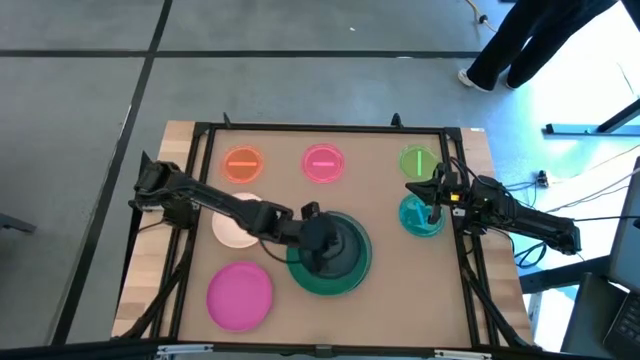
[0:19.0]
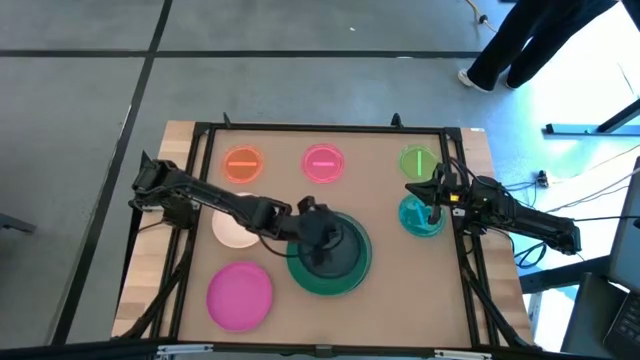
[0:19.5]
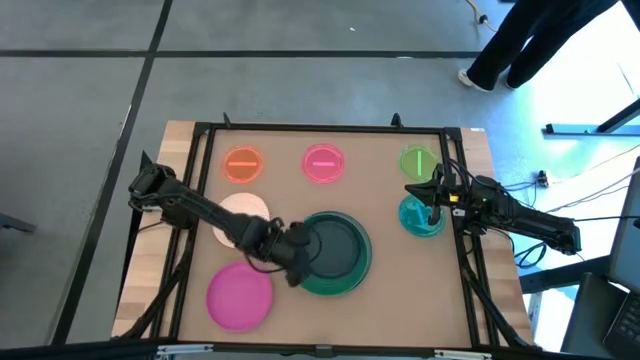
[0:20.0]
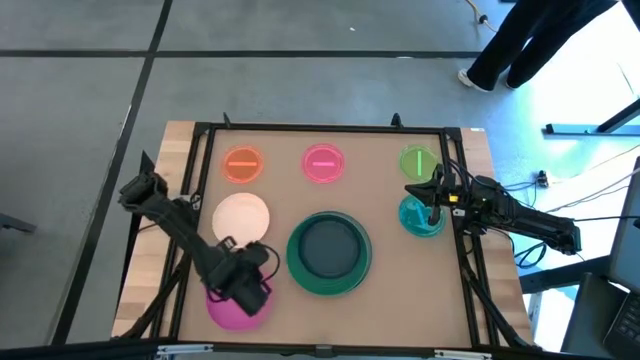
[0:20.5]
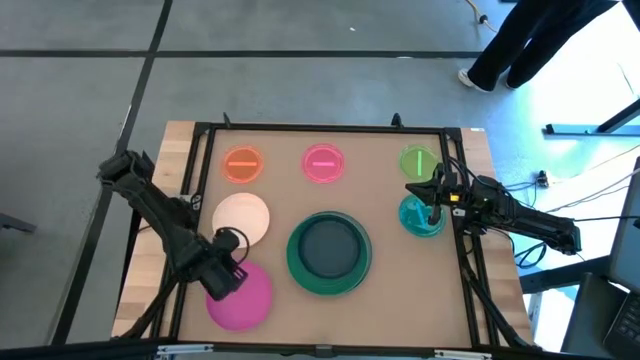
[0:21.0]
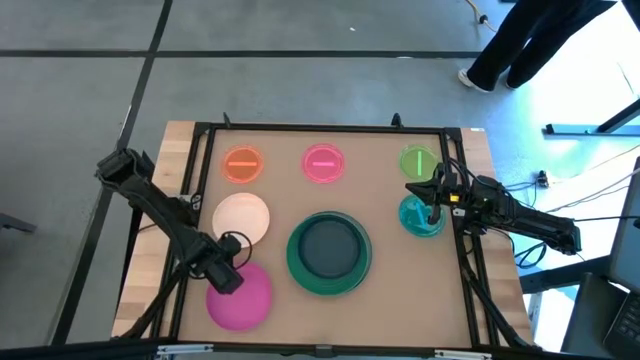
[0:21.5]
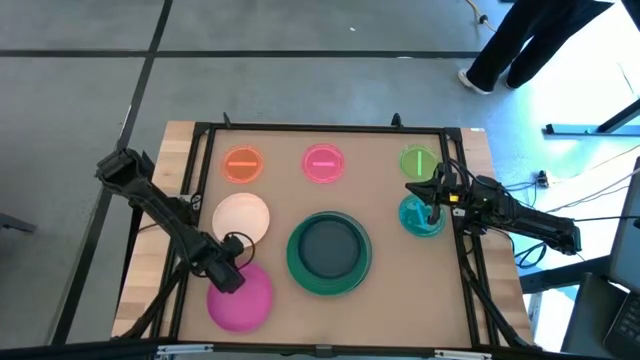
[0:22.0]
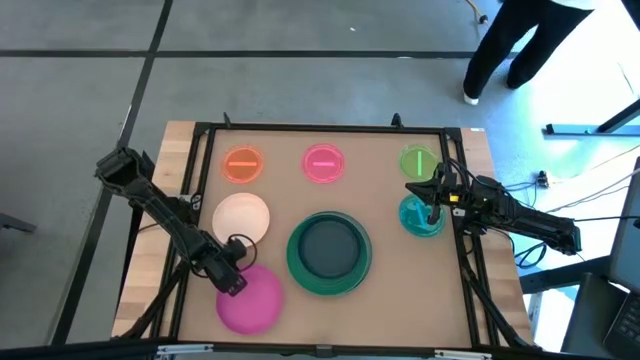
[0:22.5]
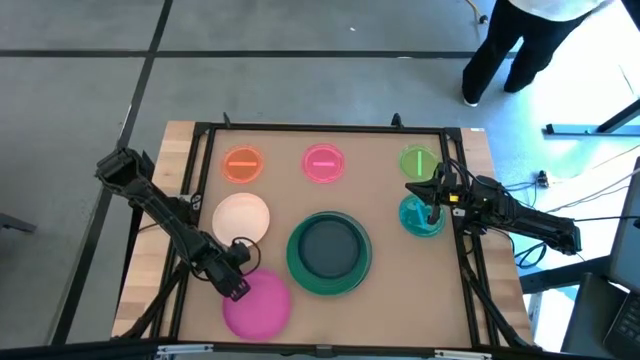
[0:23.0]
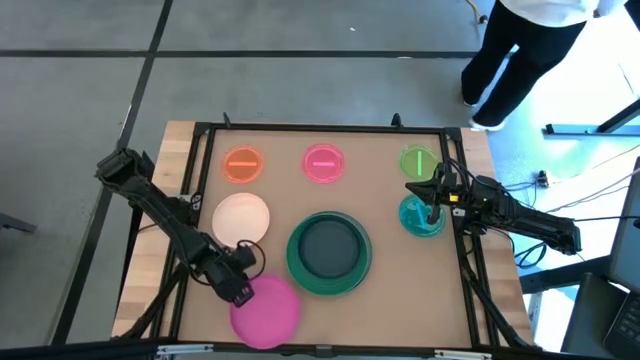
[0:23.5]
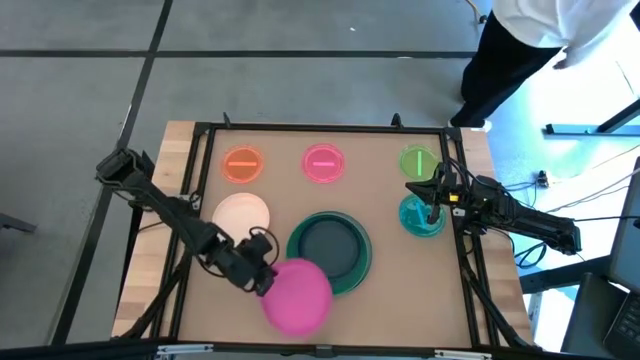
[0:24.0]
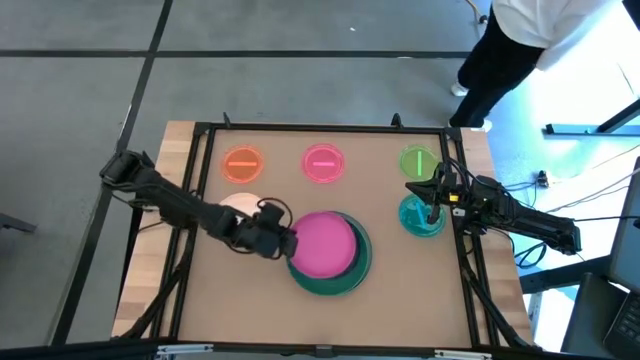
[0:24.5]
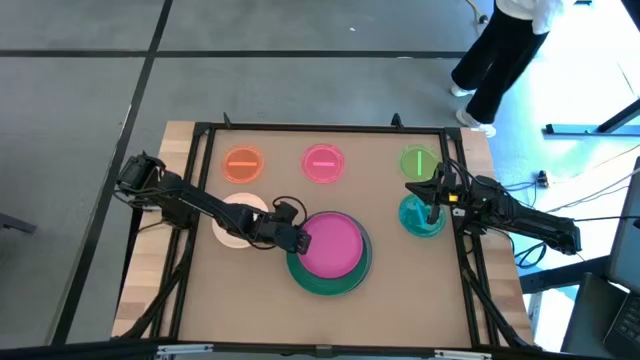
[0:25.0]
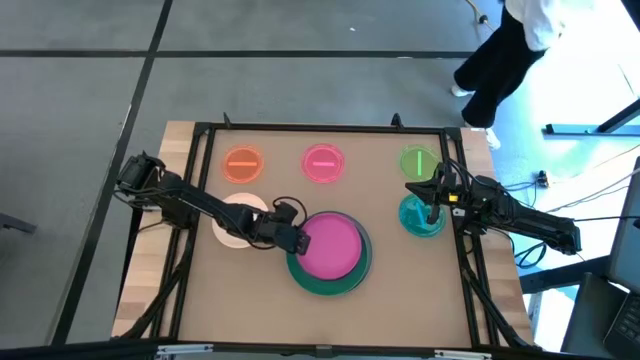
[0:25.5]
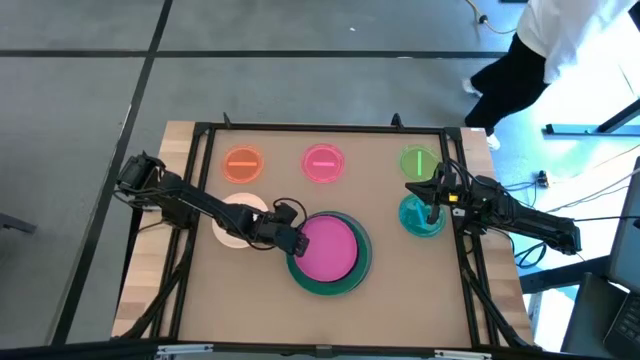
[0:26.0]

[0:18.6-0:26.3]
Task: Stack plastic plates
Stack the dark pink plate on top of the dark blue plate

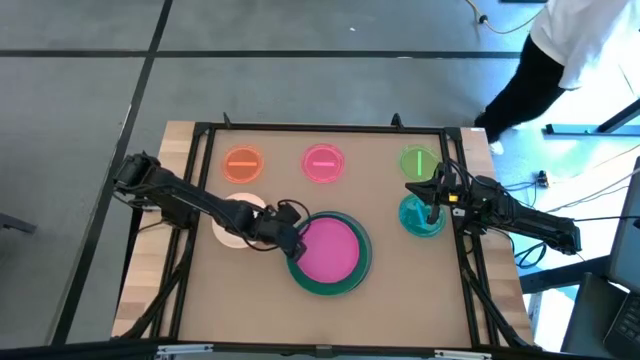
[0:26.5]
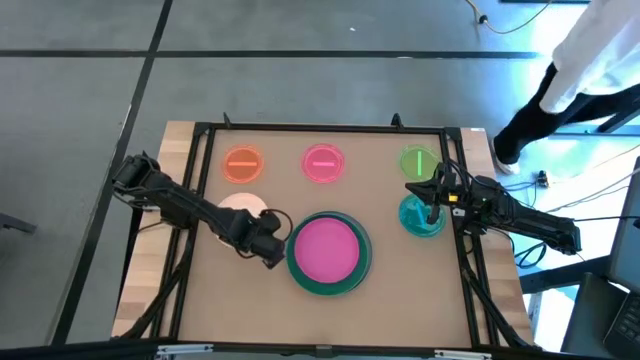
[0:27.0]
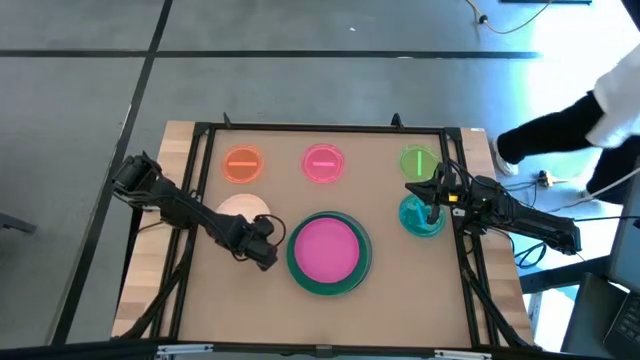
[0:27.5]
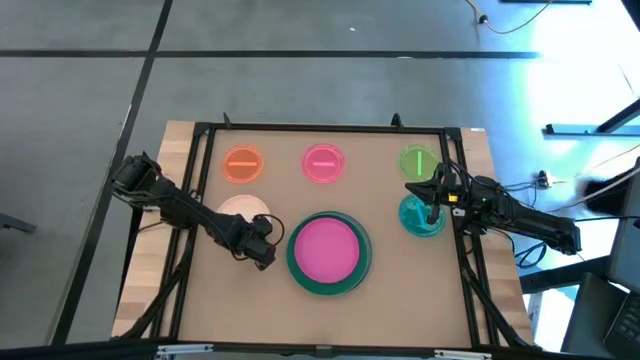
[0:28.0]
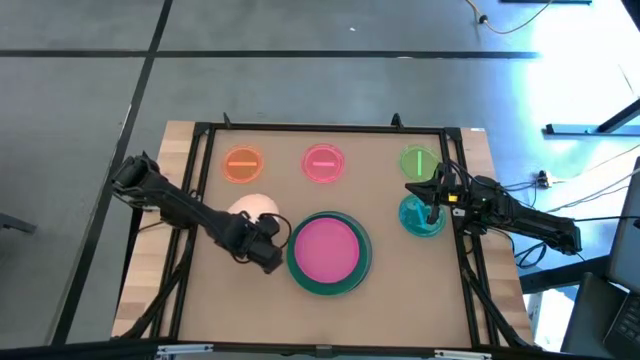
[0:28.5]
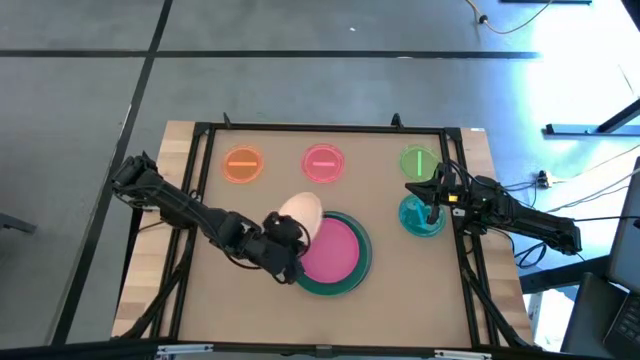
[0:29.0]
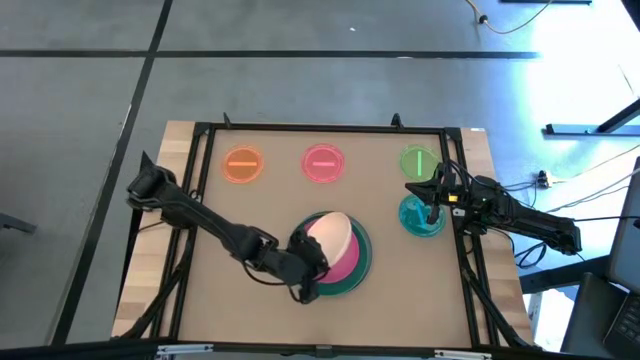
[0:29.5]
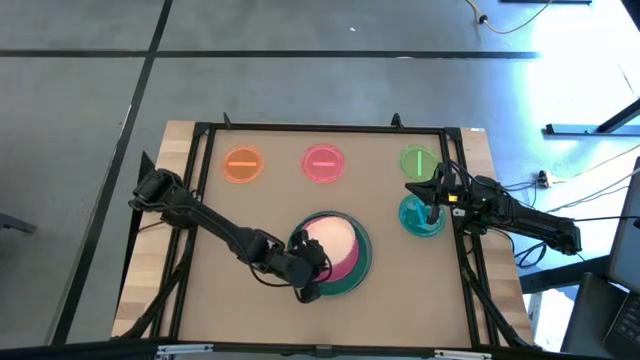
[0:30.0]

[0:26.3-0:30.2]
Stack the white plate on top of the dark pink plate

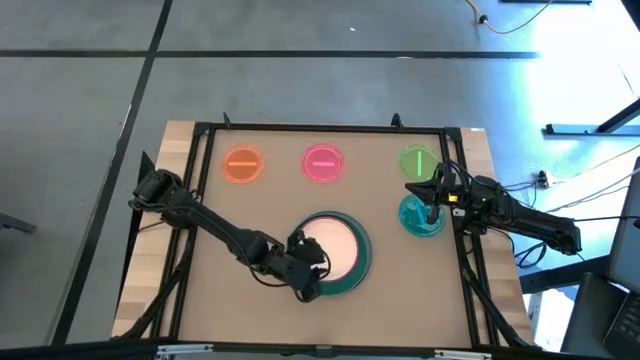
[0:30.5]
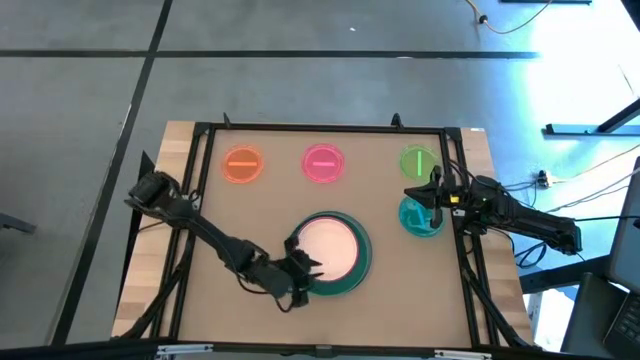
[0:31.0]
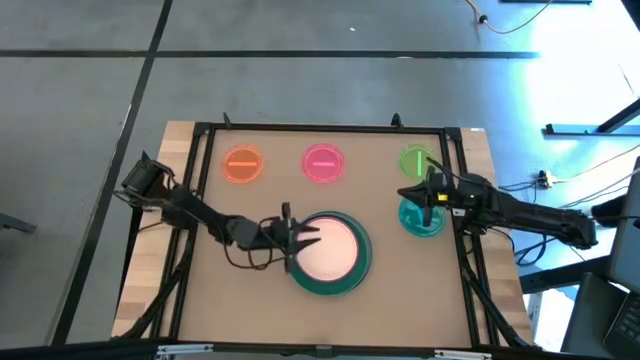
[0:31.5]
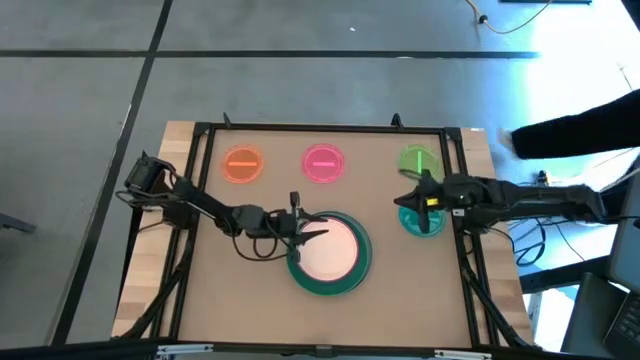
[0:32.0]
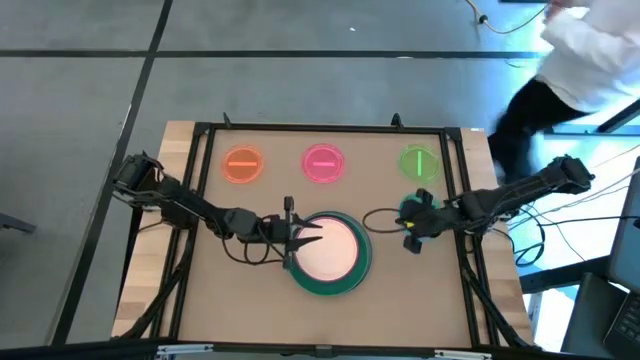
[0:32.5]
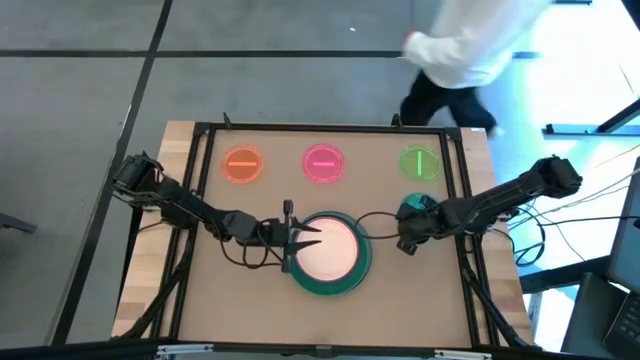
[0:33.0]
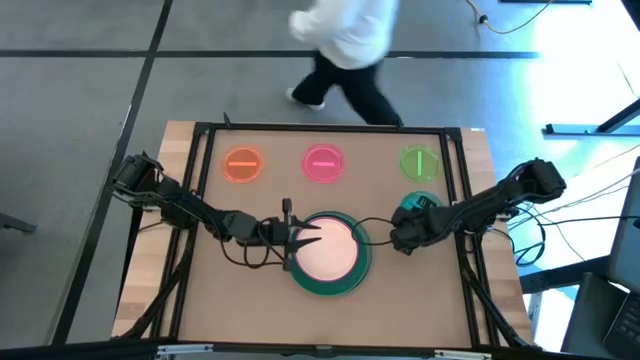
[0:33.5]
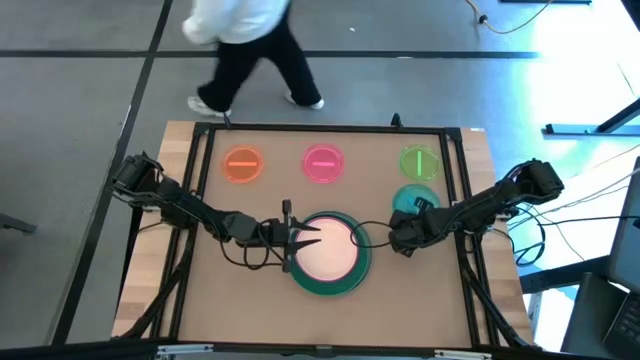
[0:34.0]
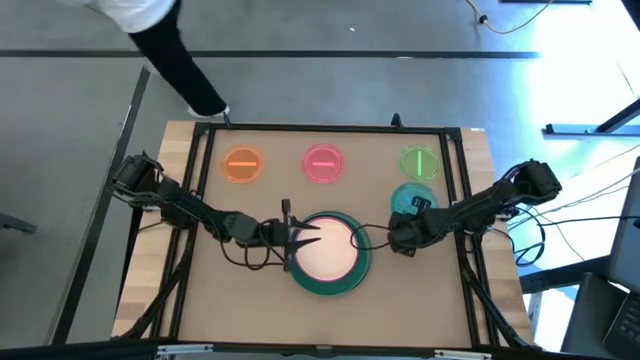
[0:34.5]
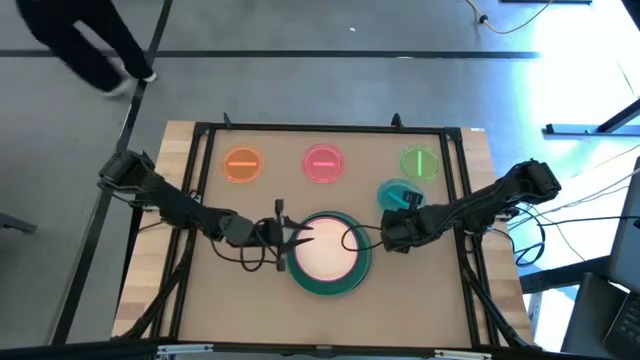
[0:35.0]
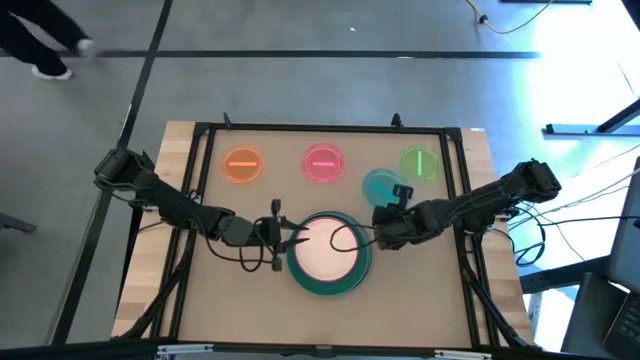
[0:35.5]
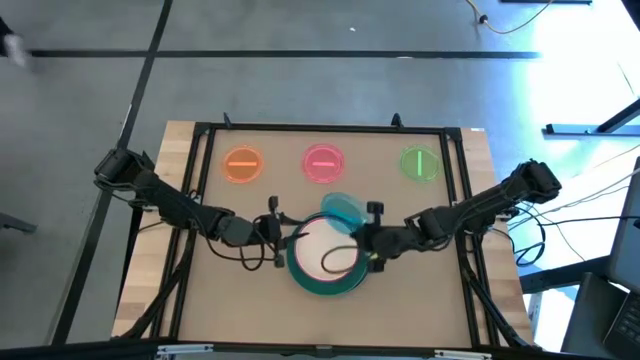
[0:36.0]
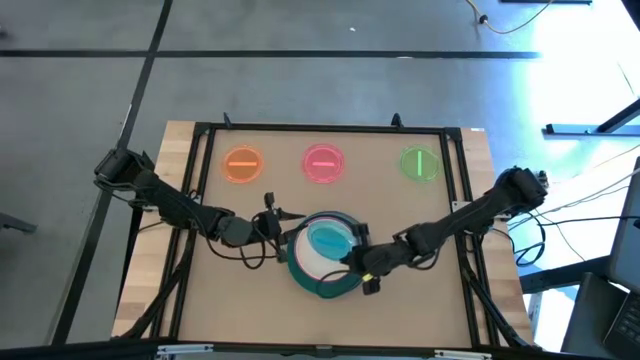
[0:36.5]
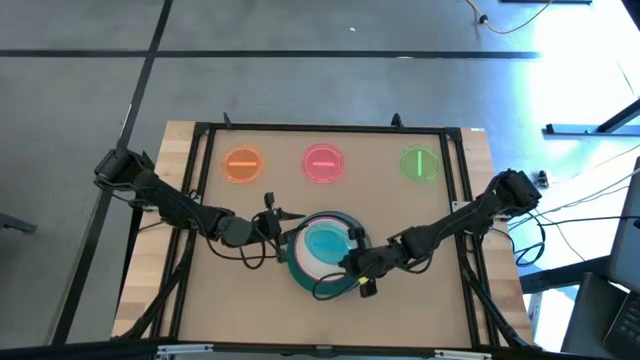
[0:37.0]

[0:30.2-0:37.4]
Stack the transparent blue plate on top of the white plate

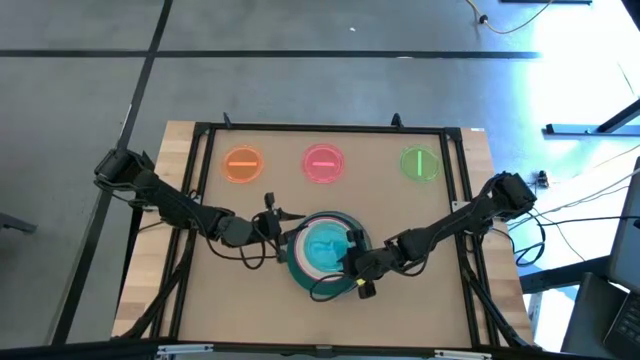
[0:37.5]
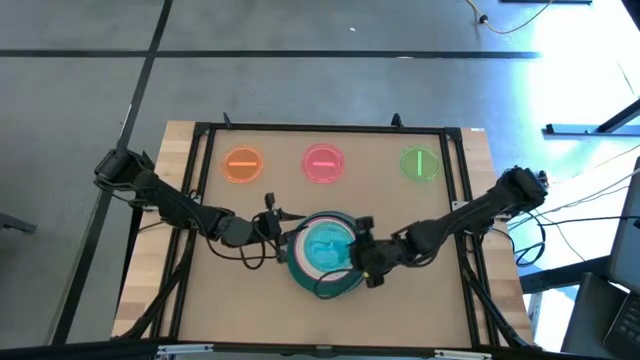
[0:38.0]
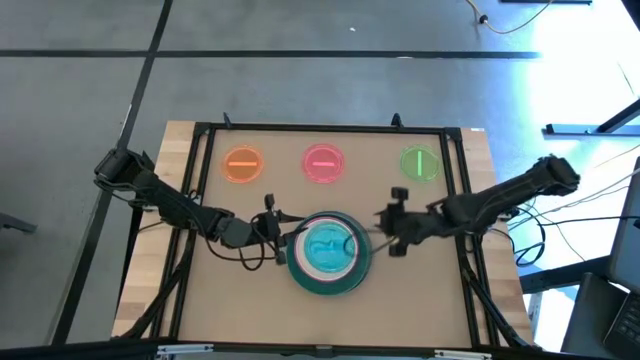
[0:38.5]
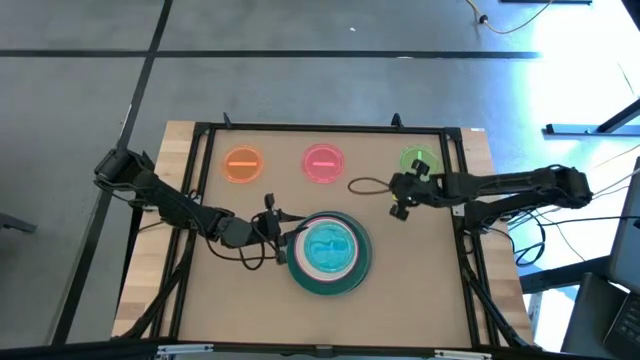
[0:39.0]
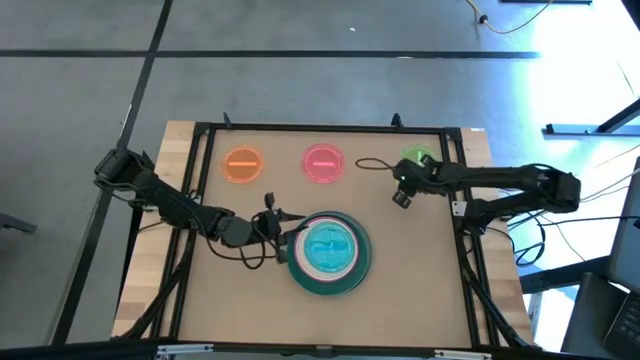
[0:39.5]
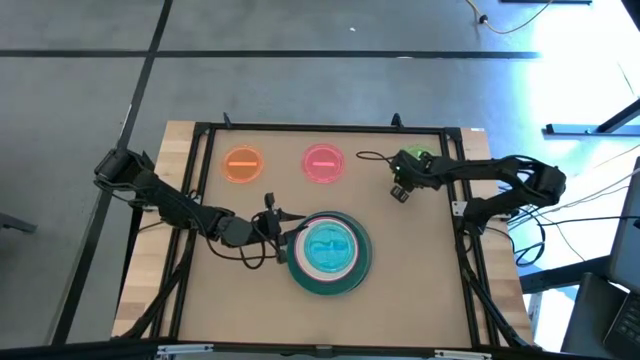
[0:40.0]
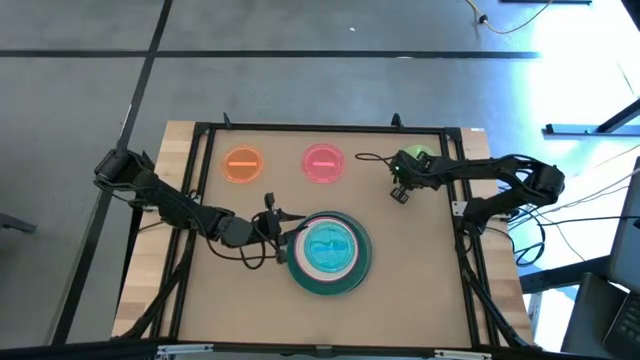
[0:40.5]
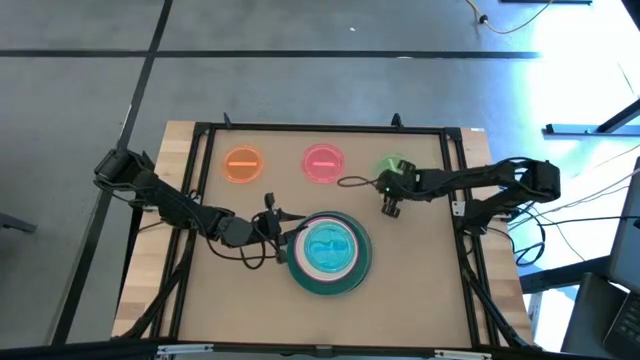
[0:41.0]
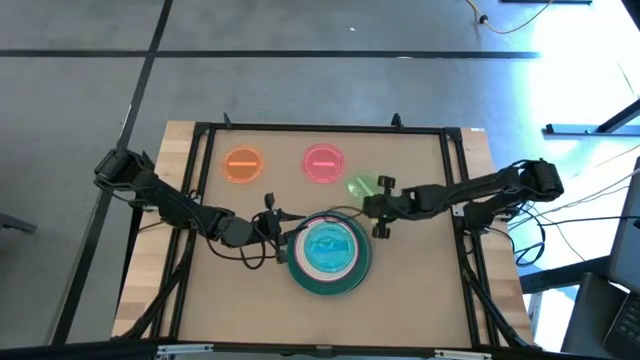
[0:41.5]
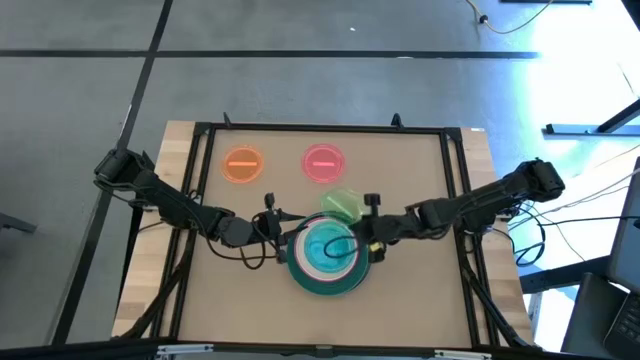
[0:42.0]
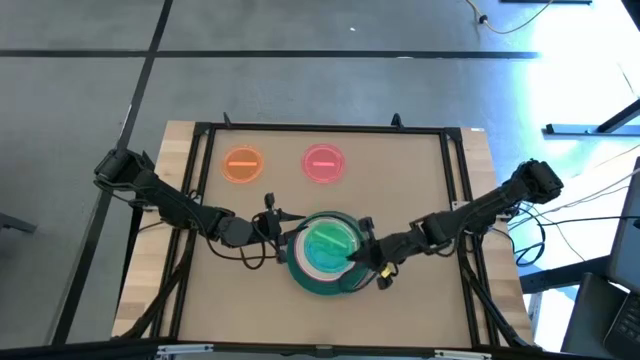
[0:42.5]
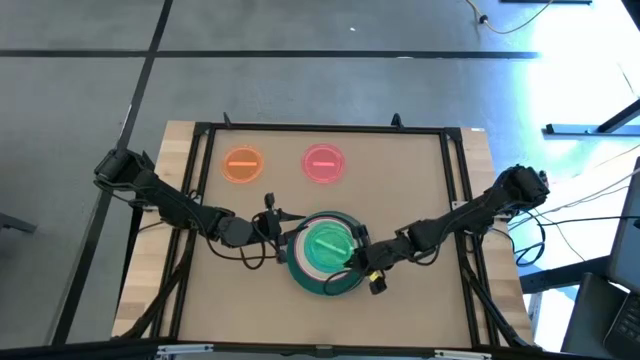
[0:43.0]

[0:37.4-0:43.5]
Stack the transparent green plate on top of the light blue plate
